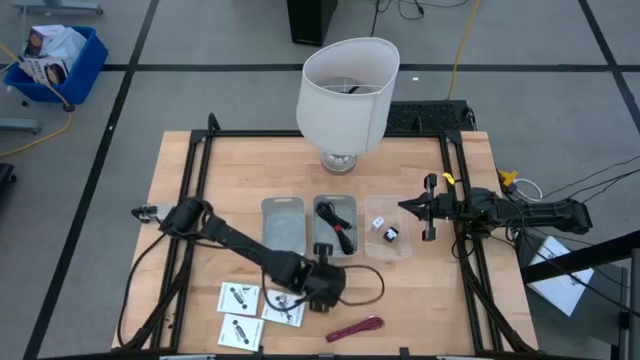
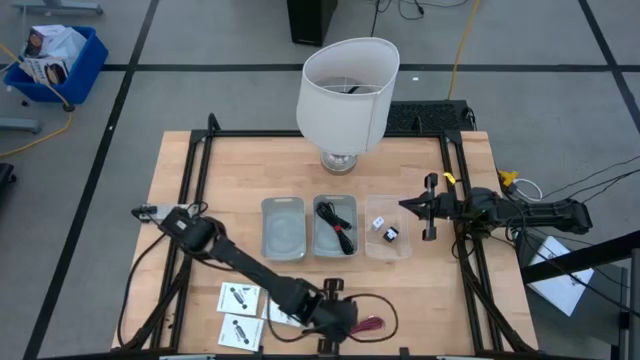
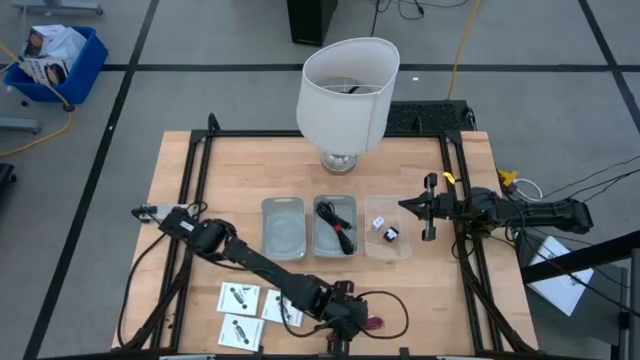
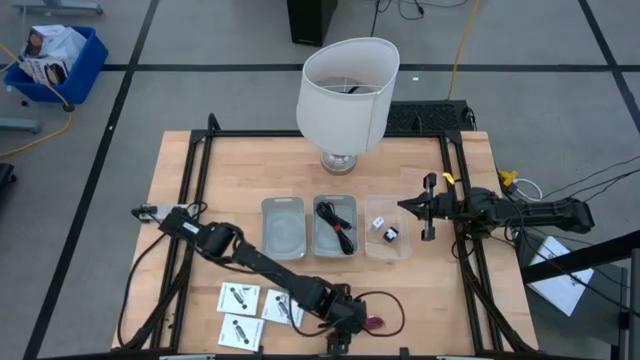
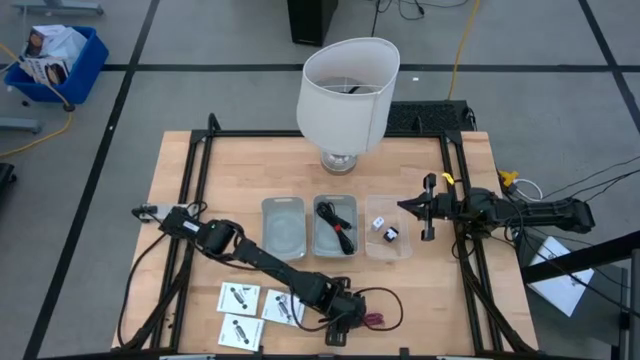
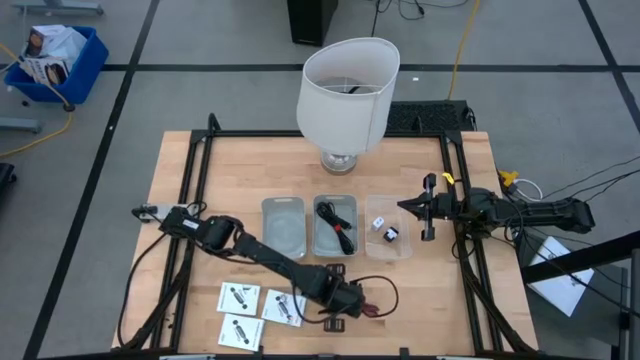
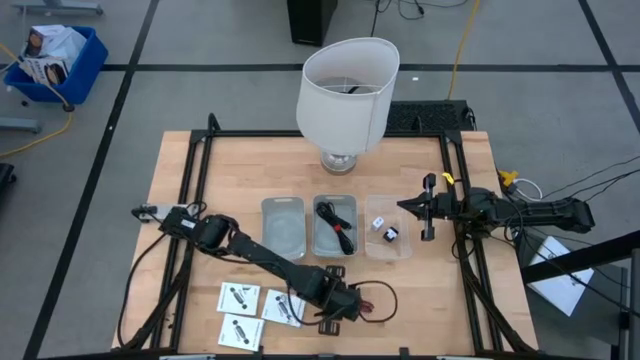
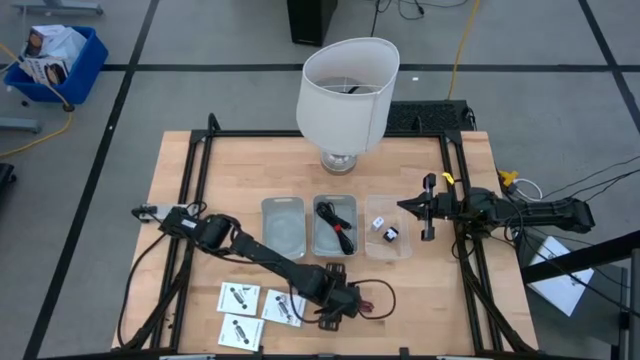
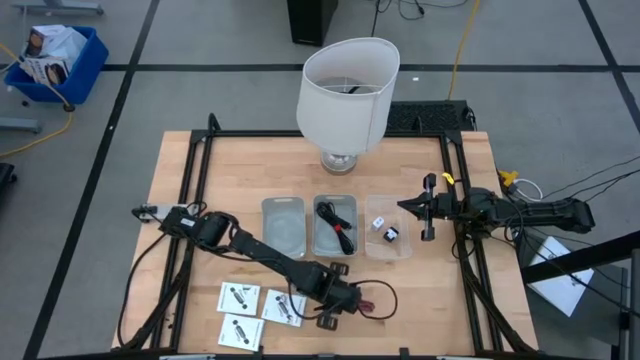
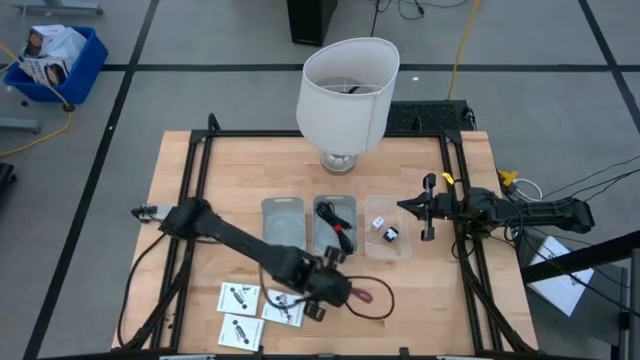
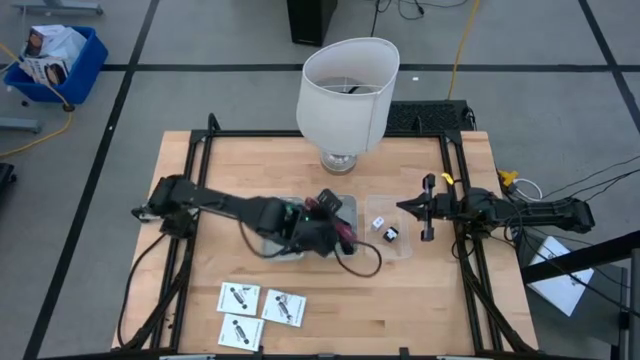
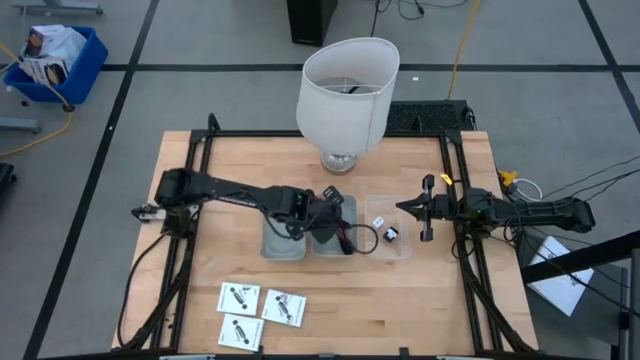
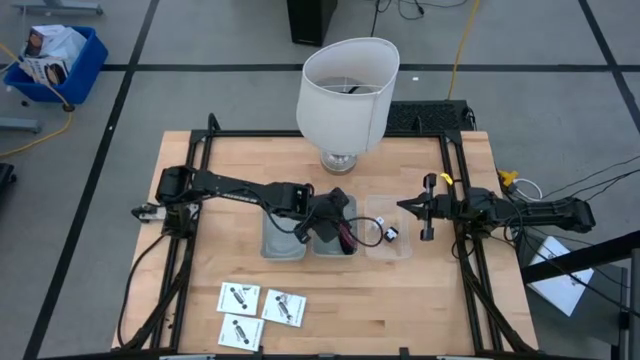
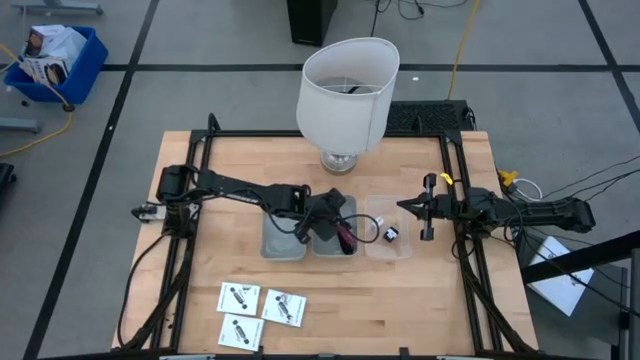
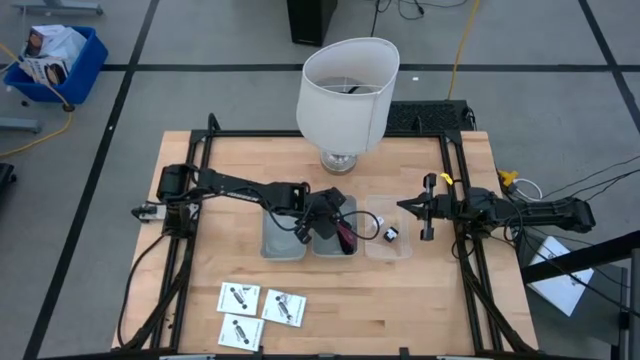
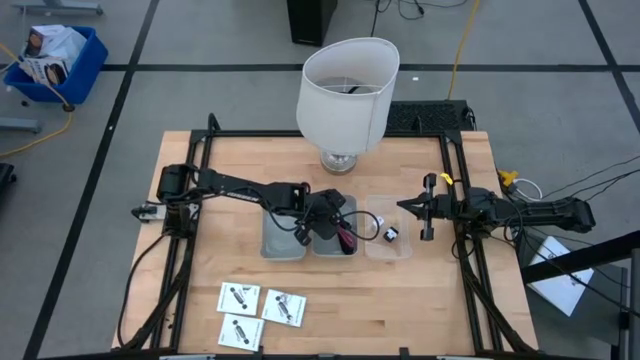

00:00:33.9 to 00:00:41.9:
Task: Pick and place items into bin
Put the black pink charger cable into the right gray bin

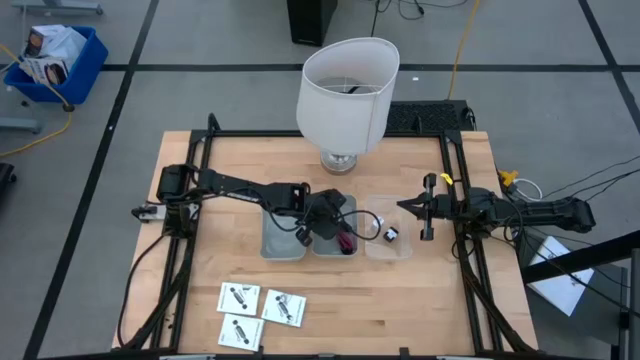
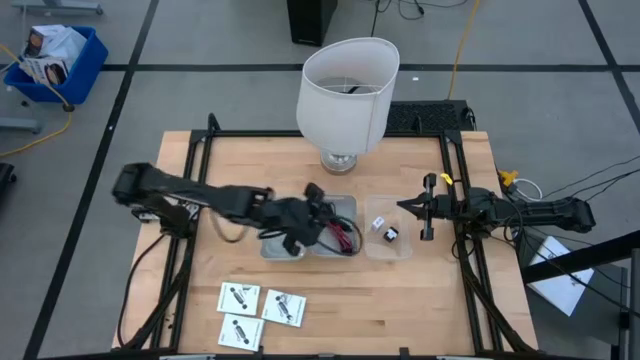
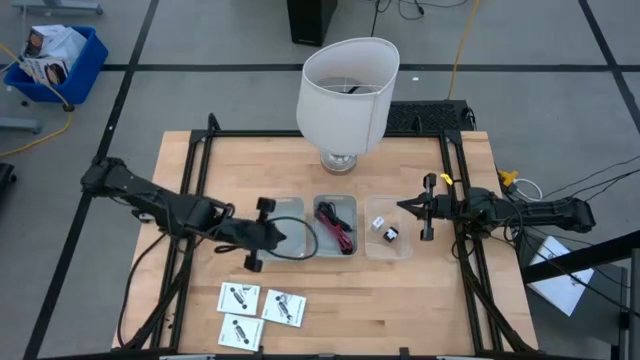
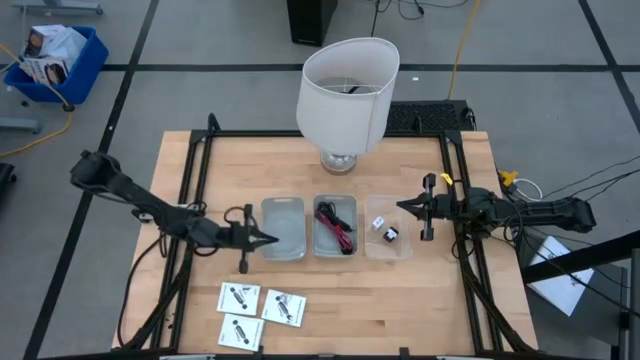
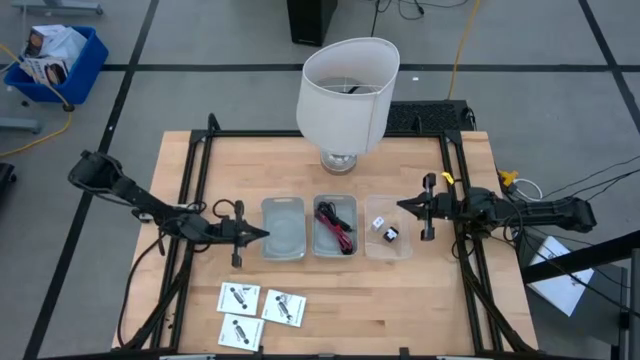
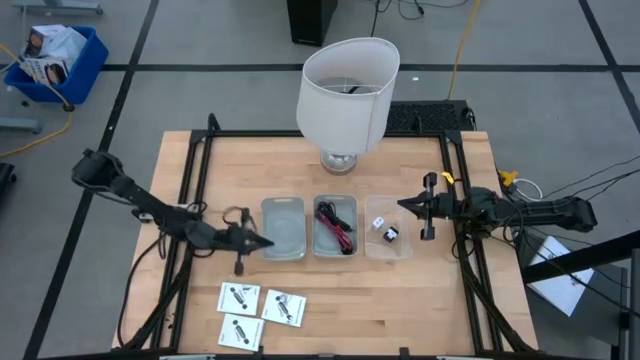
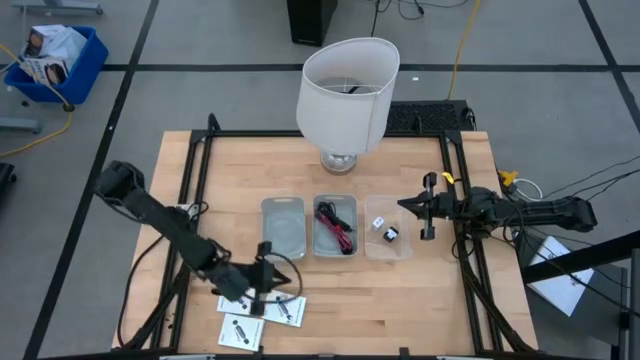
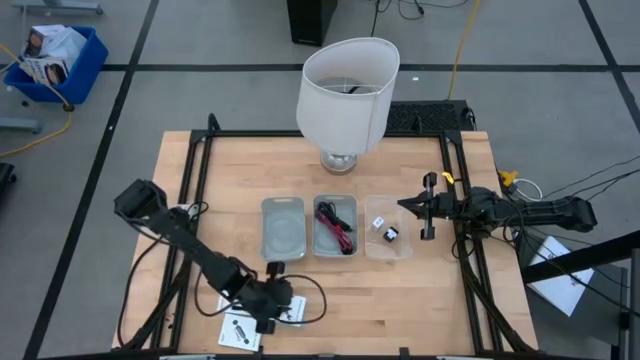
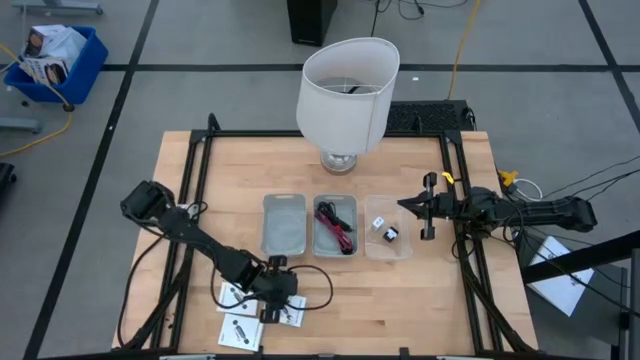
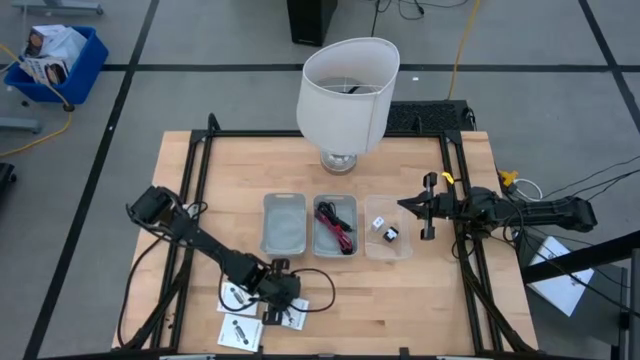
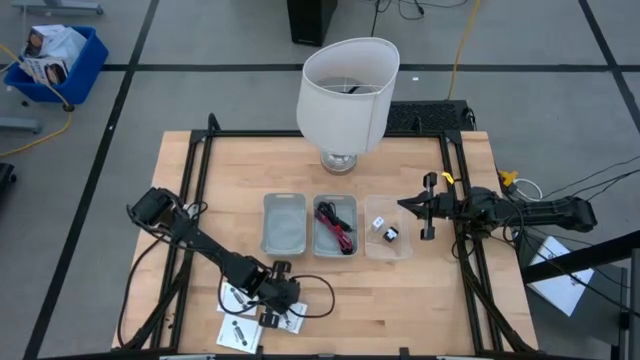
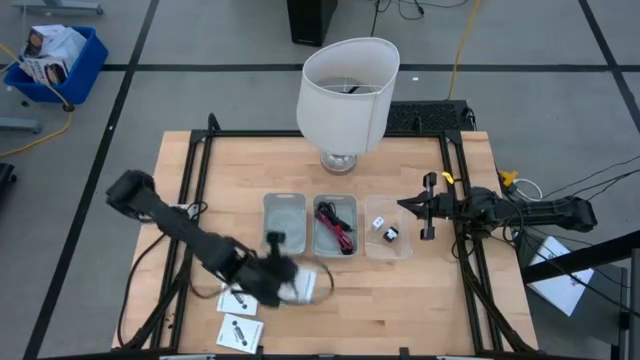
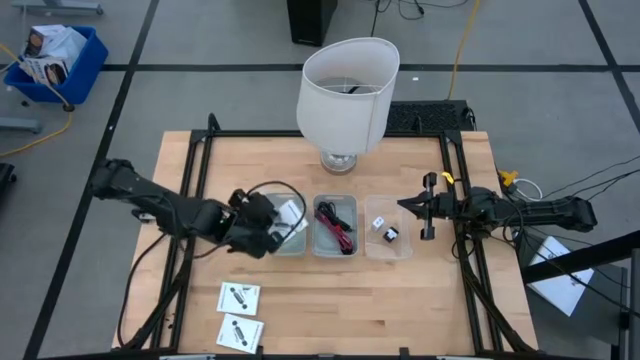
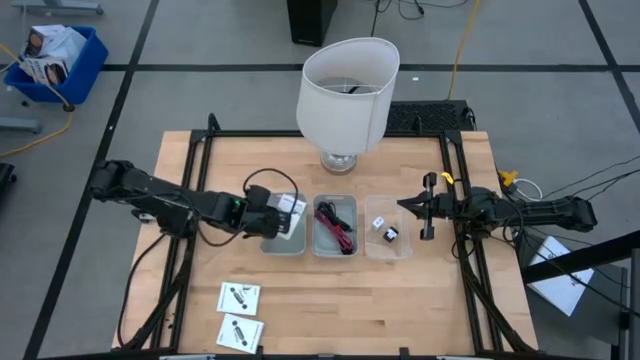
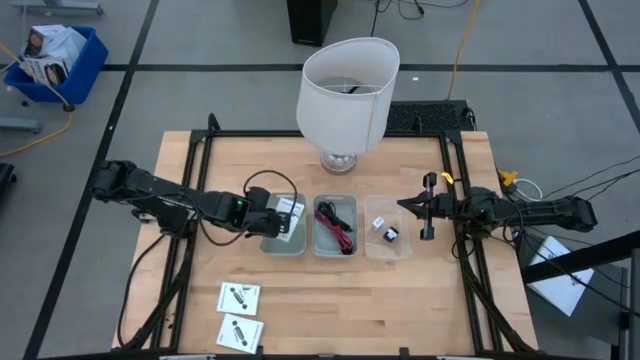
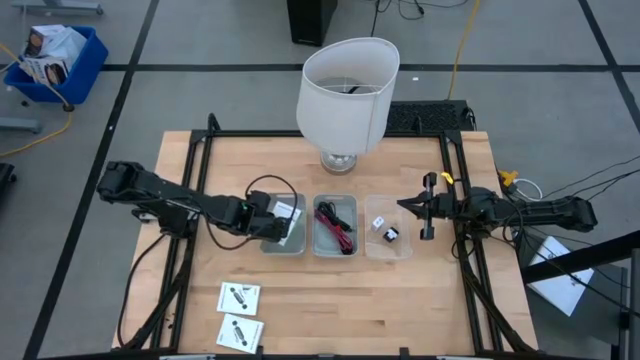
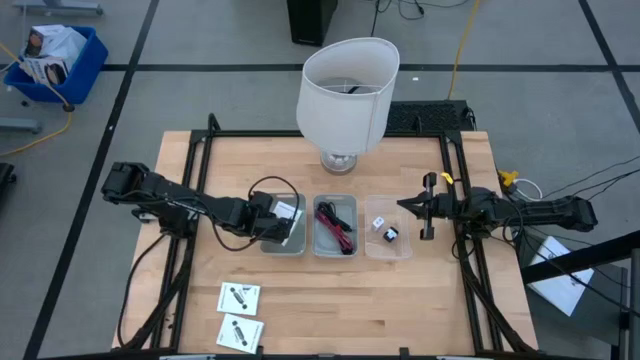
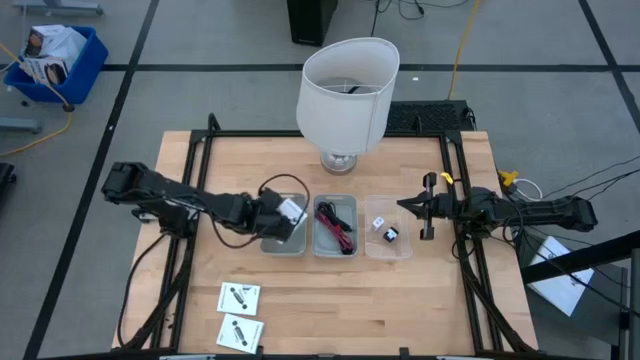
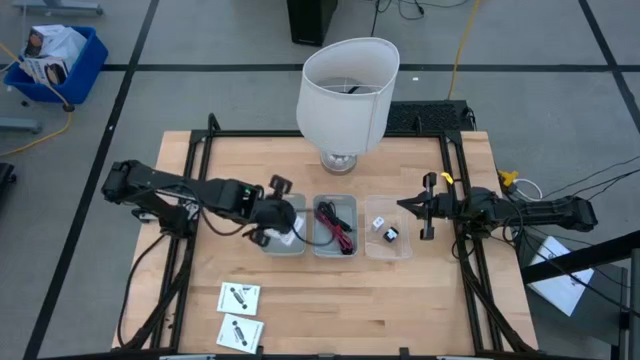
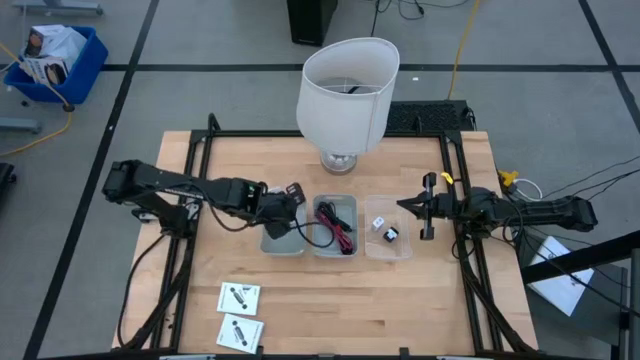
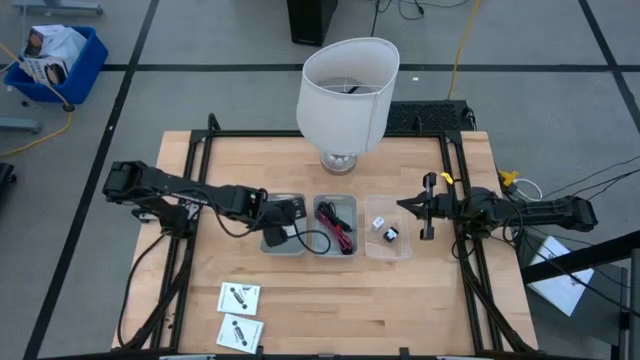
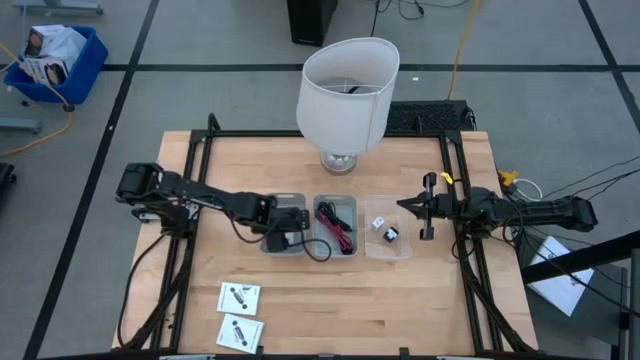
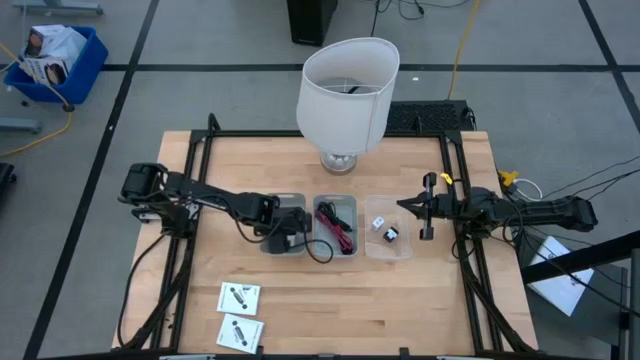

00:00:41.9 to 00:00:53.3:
Put the top right card reader box into the left gray bin

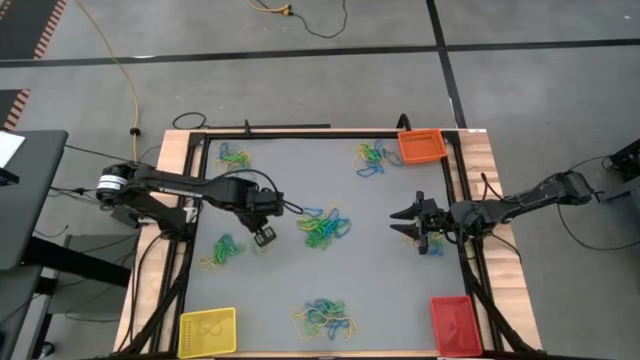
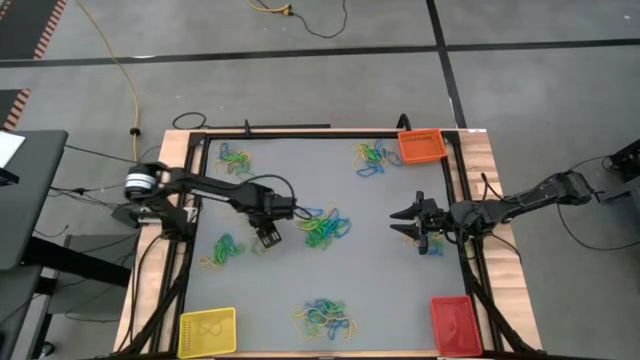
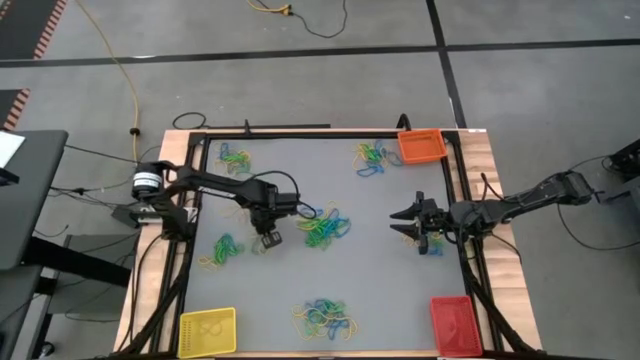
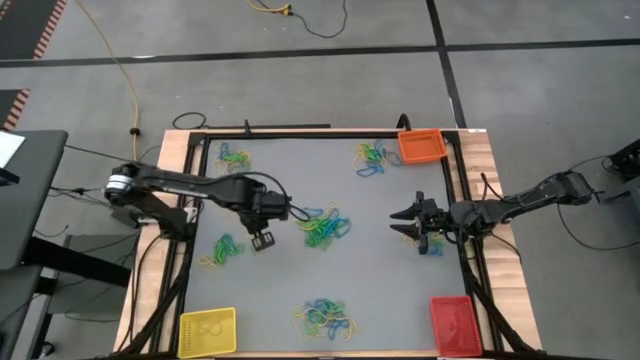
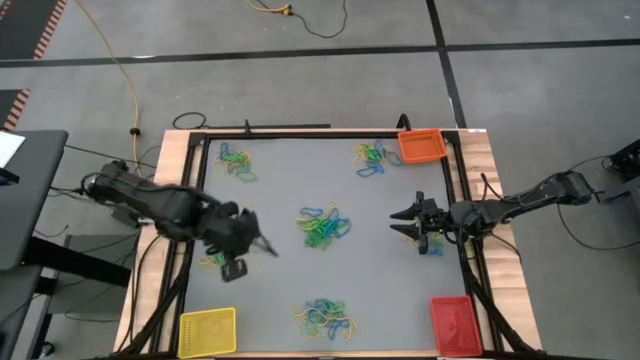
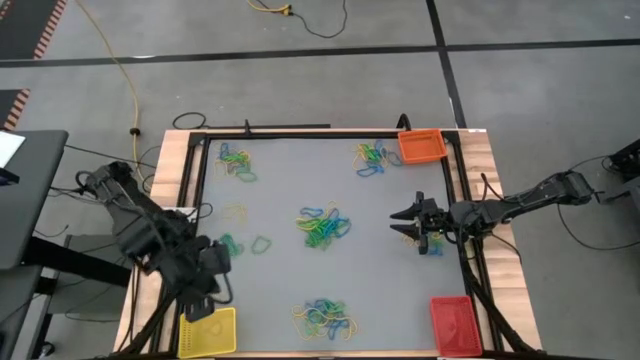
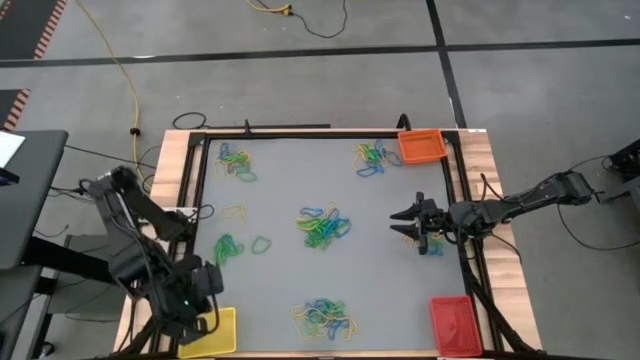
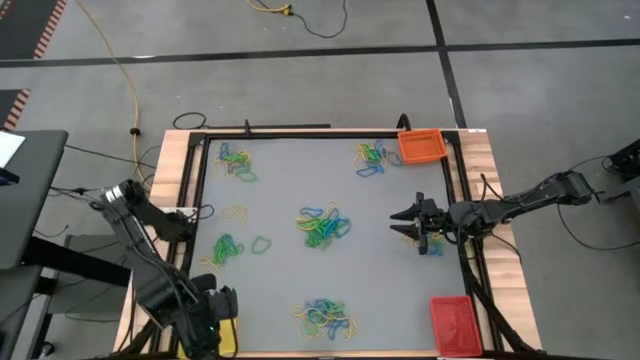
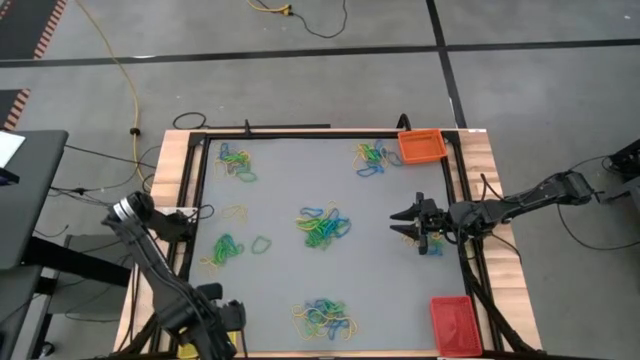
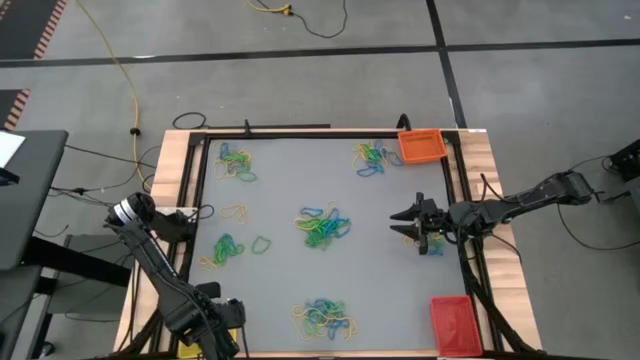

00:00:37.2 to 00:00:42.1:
Task: Sort rubber bands into baskets
Put the yellow rubber band into the yellow bin
